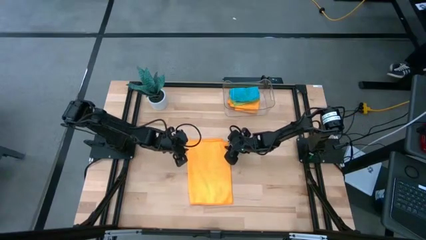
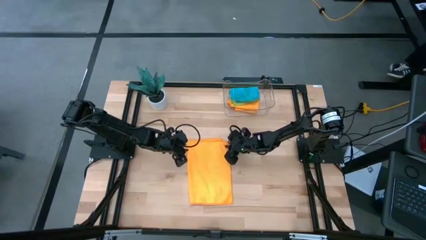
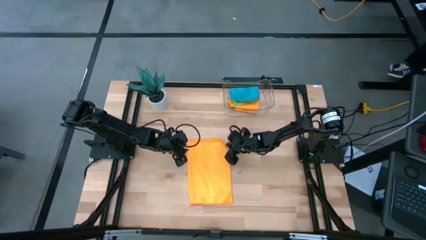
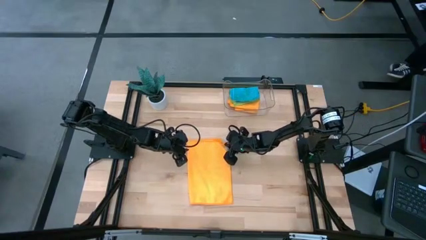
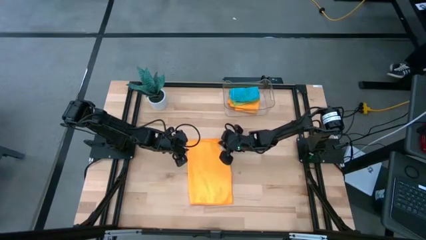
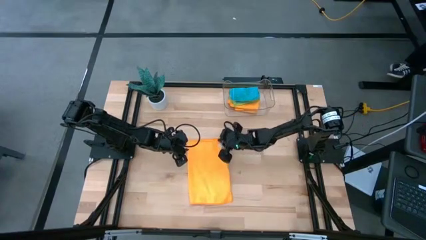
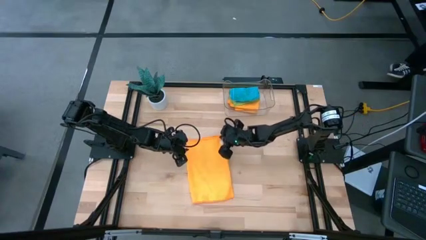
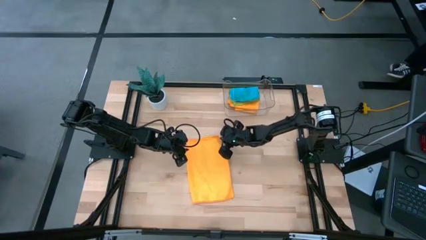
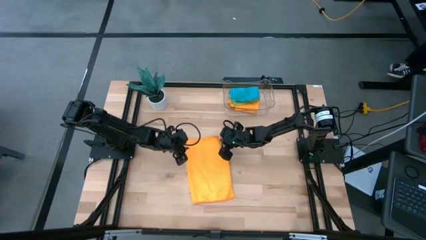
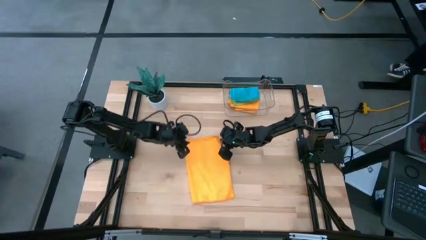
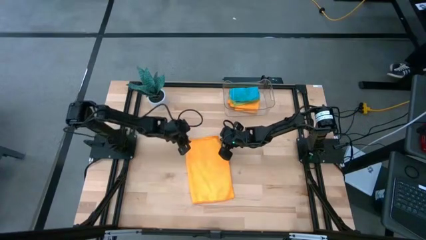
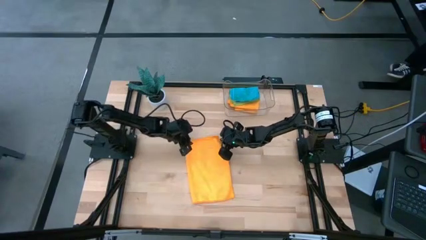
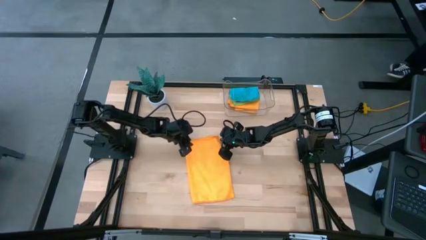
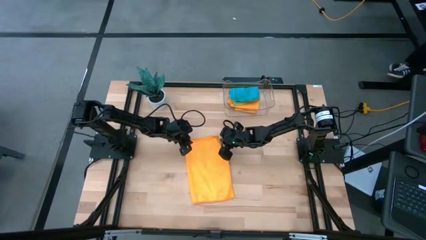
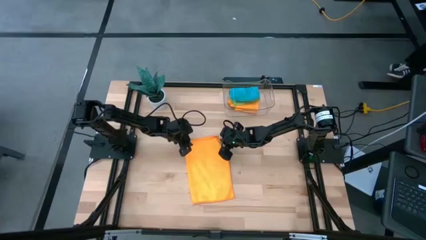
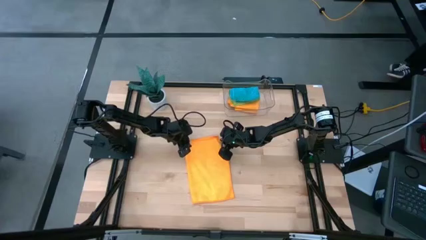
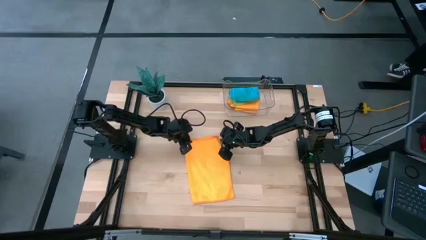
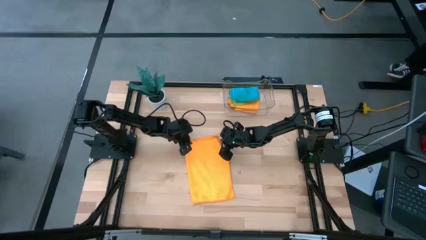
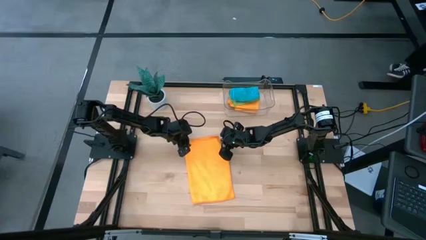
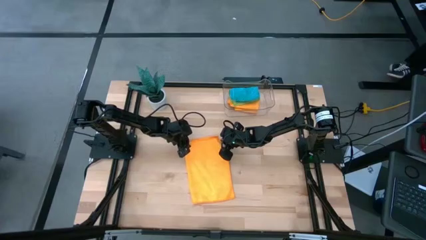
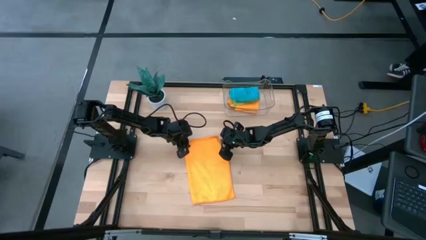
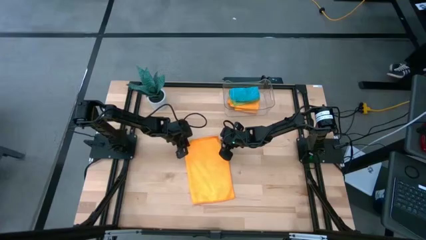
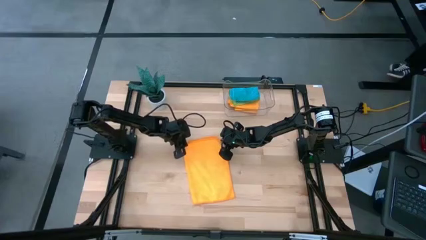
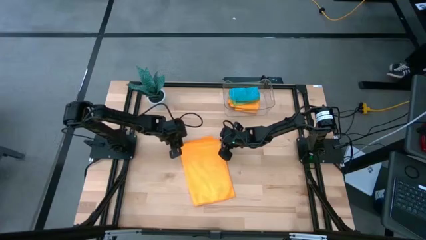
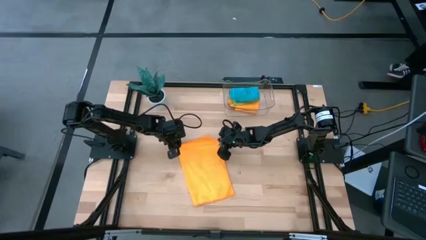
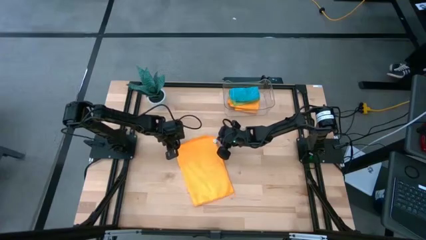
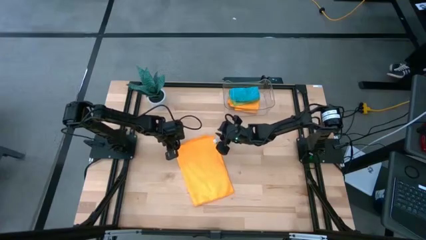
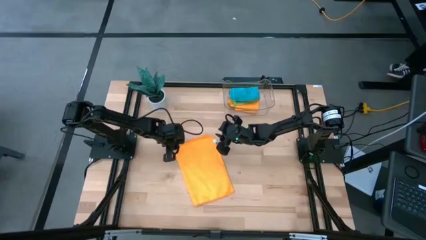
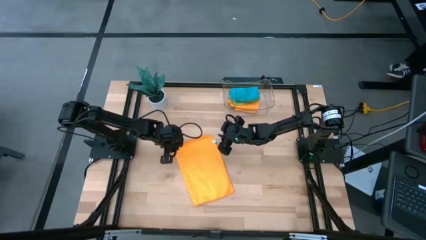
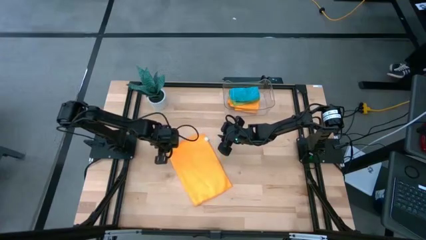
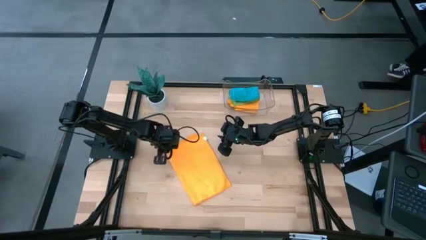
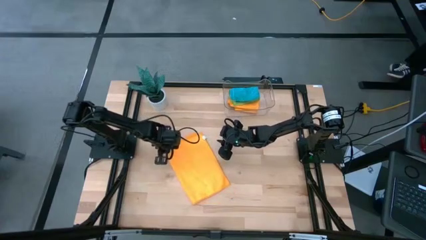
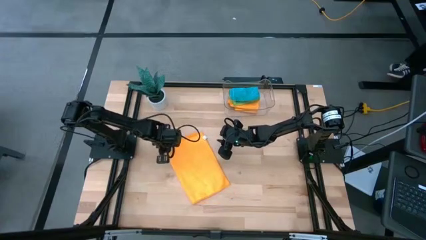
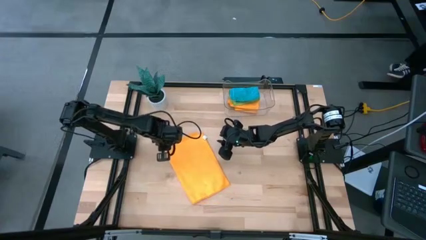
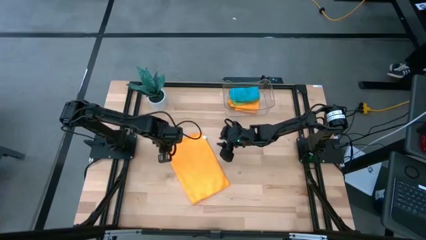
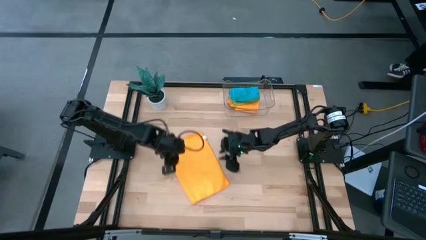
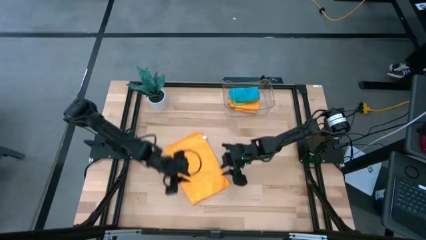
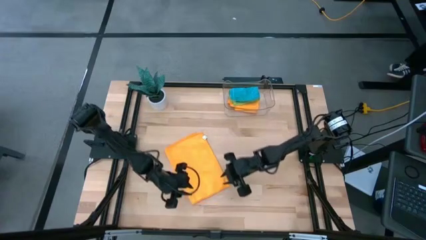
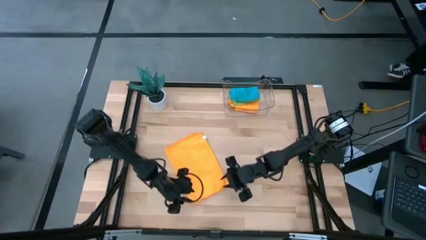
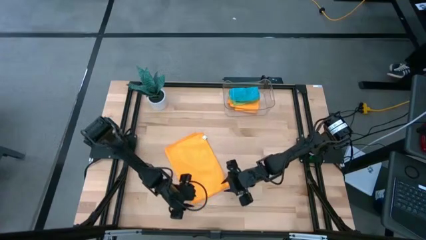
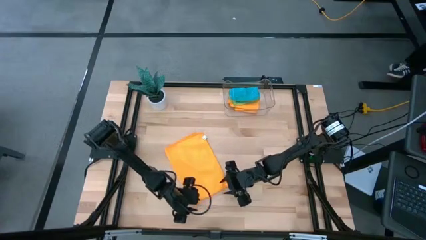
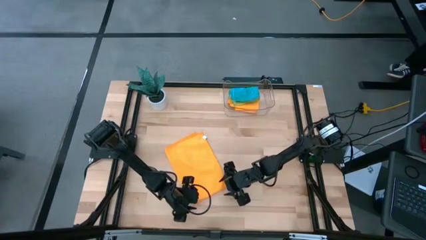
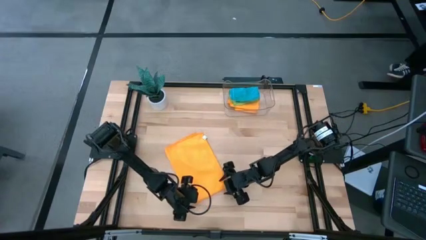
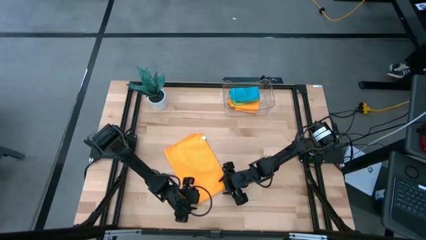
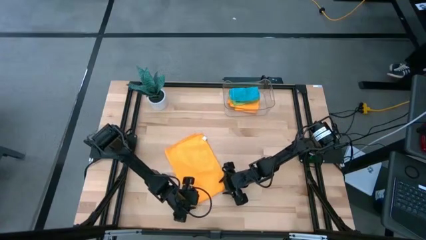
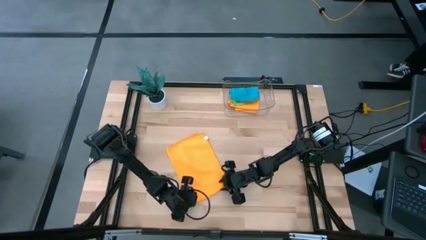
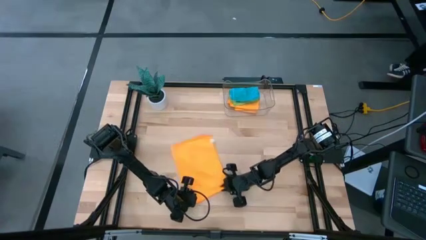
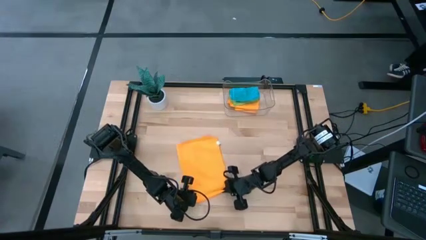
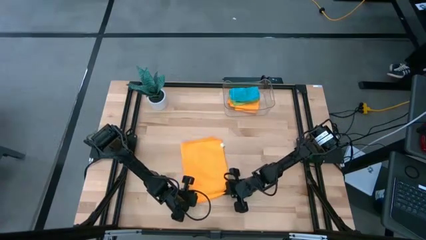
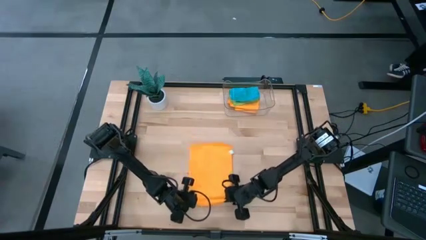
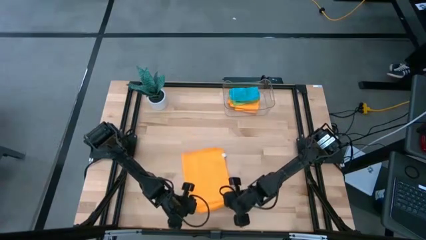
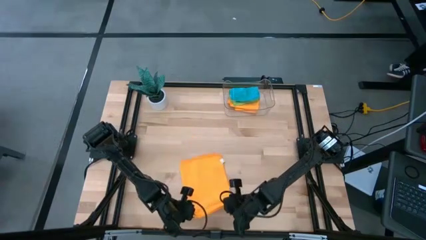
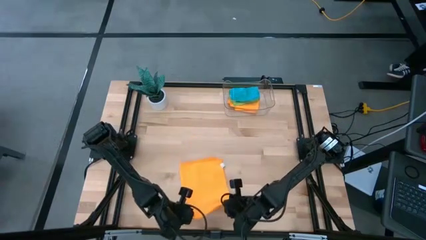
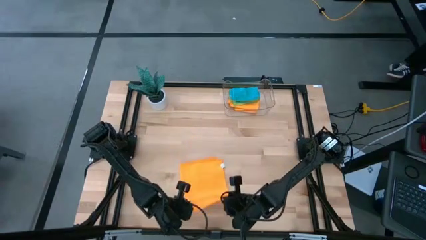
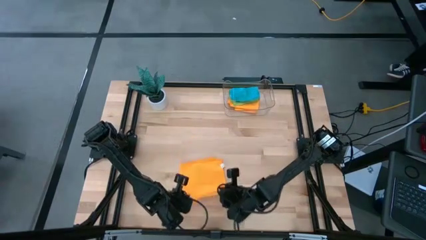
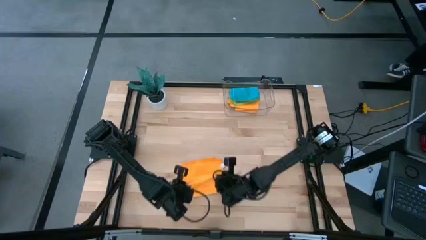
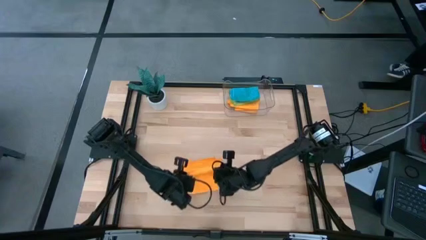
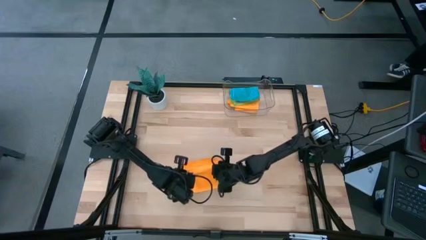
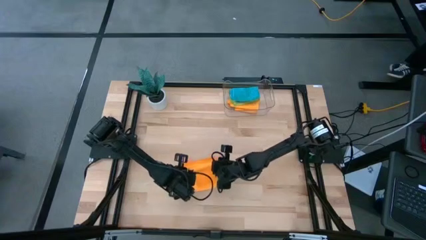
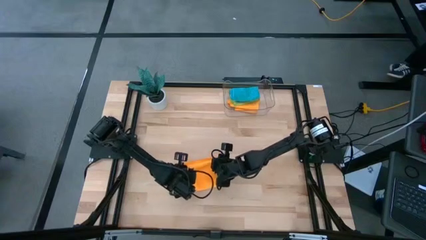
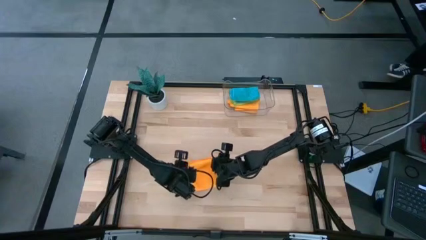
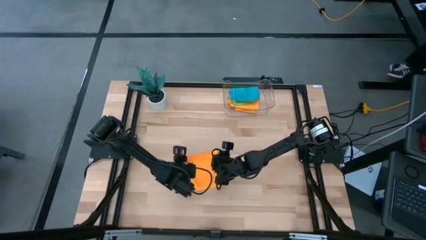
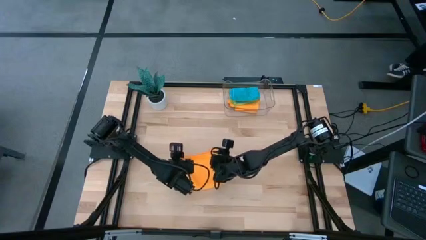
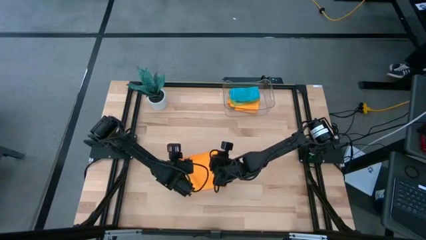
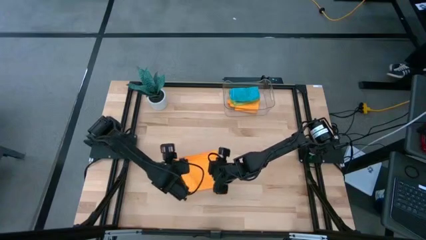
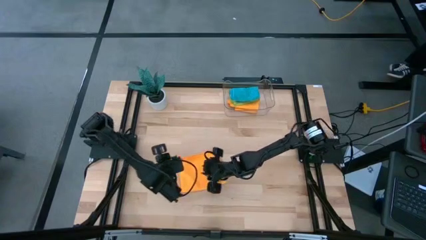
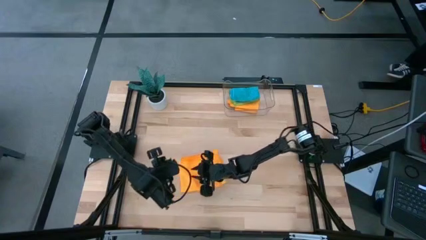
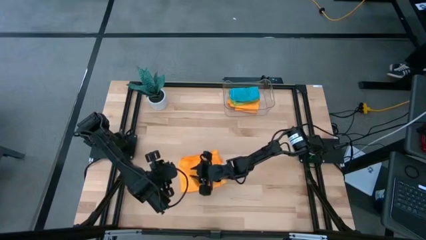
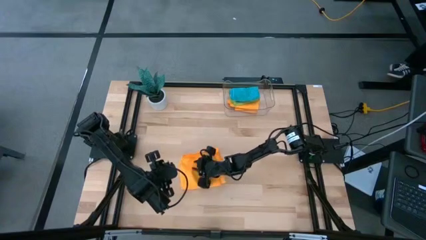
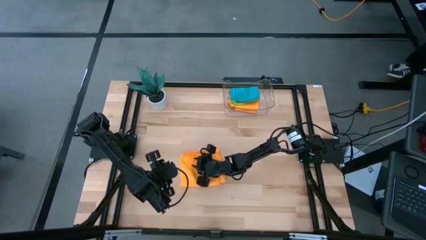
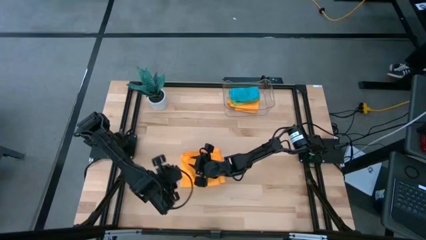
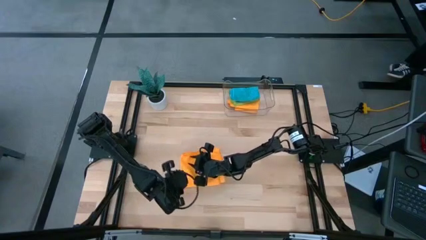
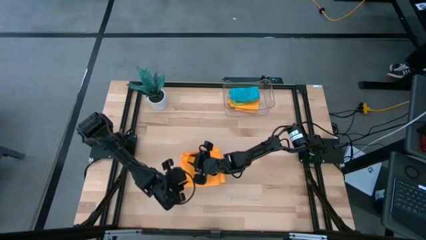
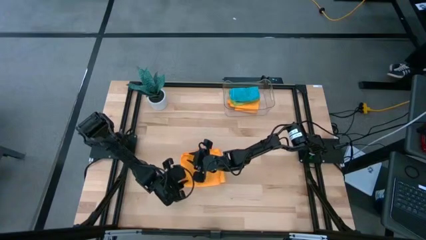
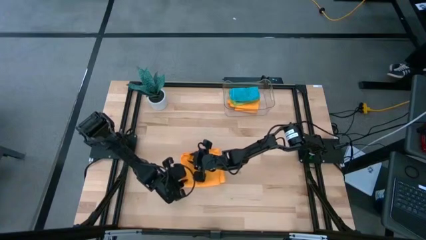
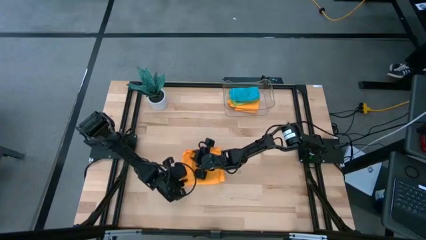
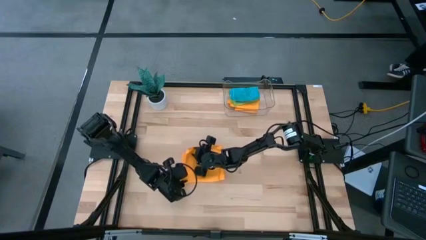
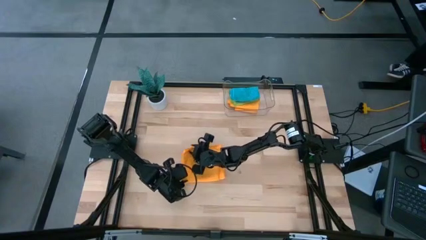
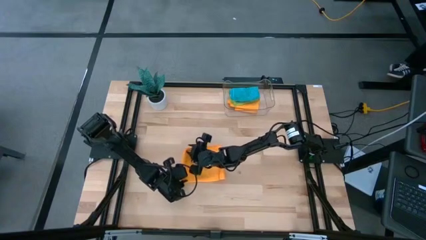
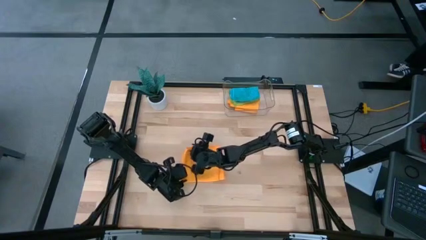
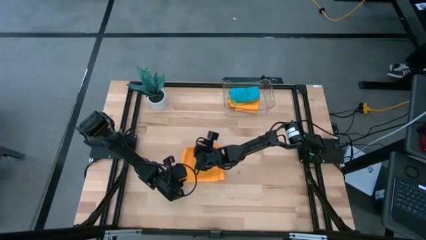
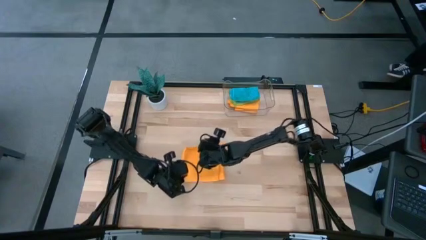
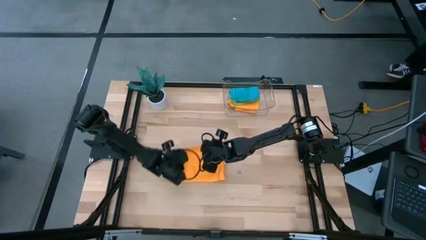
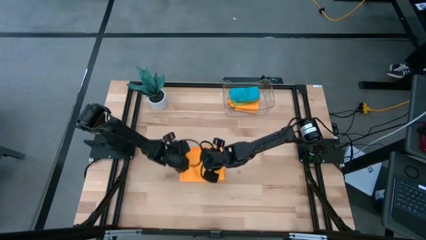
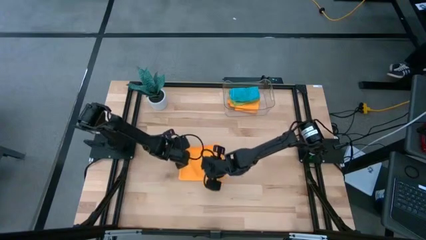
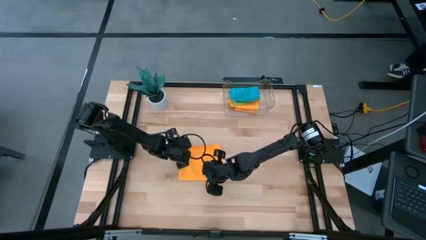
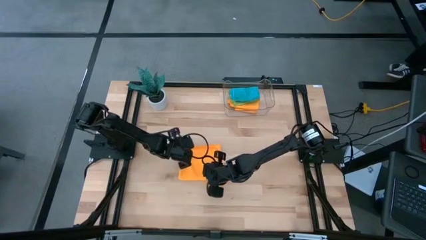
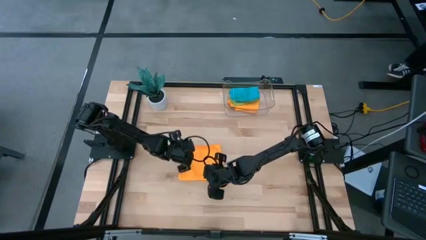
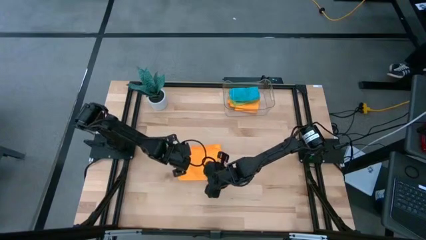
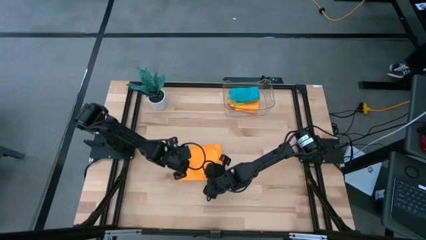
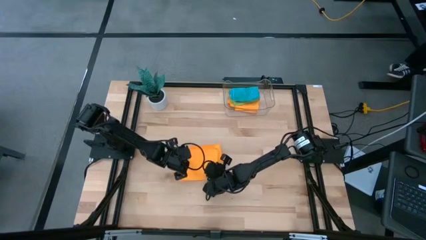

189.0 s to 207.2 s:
Task: Fold microfiber towels
Fold the orange microfiber towel
